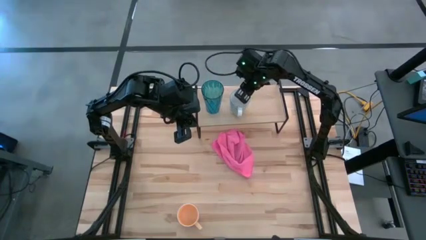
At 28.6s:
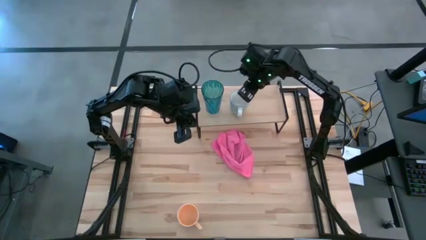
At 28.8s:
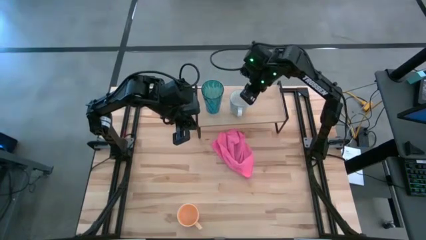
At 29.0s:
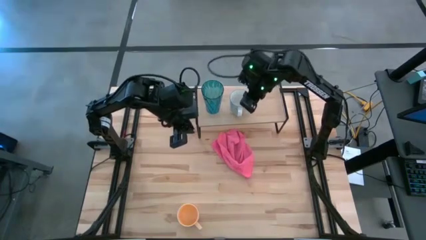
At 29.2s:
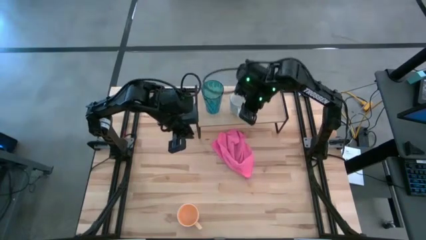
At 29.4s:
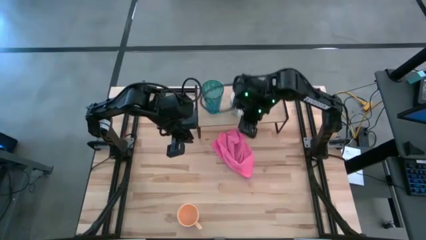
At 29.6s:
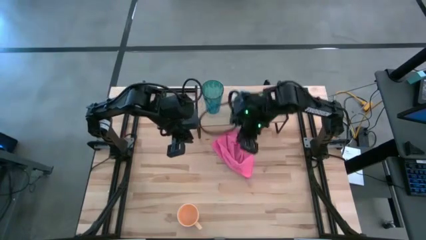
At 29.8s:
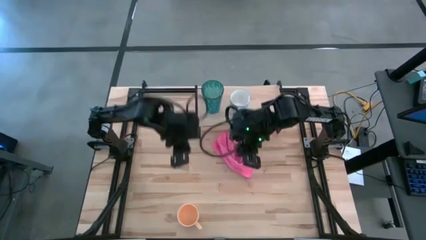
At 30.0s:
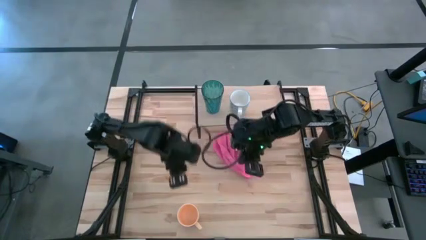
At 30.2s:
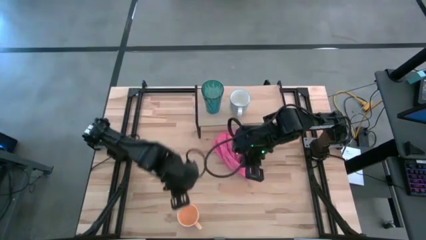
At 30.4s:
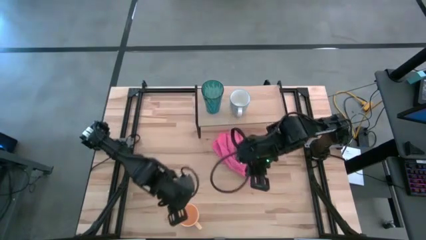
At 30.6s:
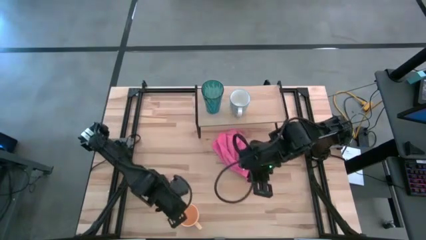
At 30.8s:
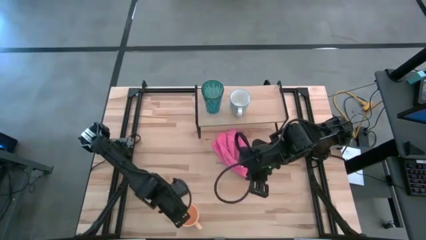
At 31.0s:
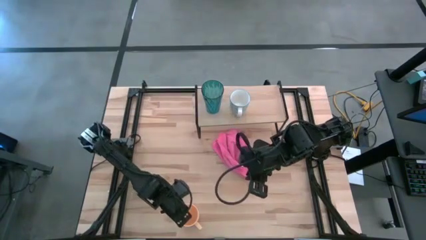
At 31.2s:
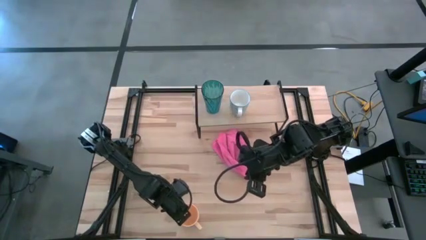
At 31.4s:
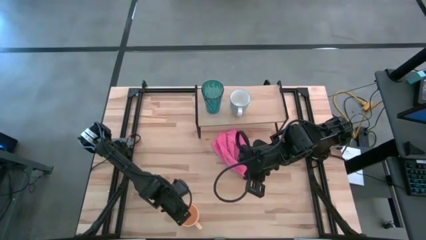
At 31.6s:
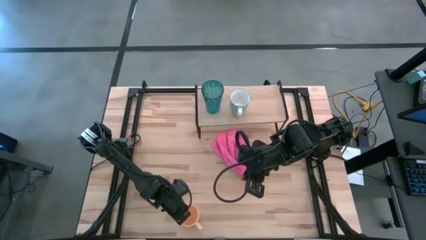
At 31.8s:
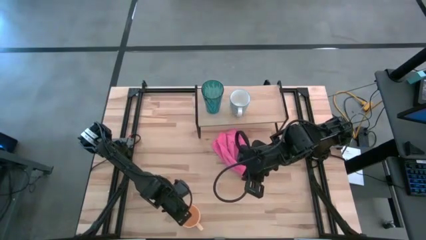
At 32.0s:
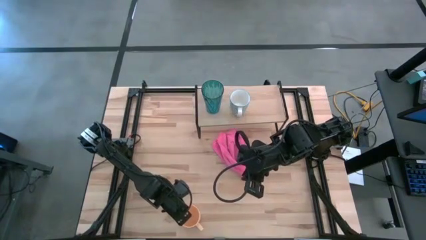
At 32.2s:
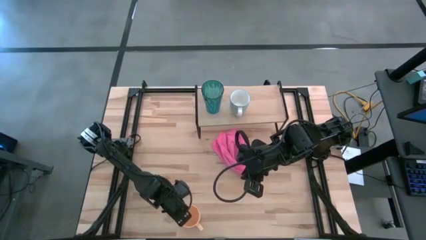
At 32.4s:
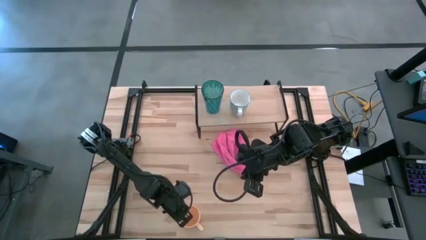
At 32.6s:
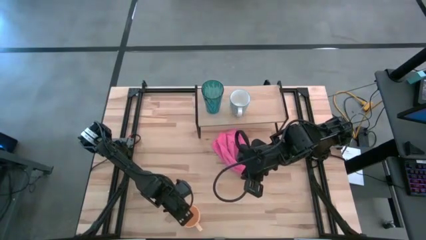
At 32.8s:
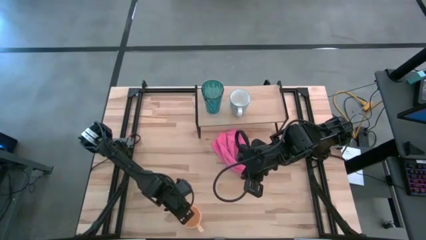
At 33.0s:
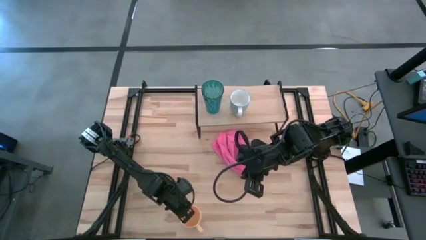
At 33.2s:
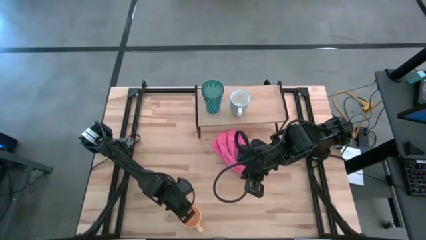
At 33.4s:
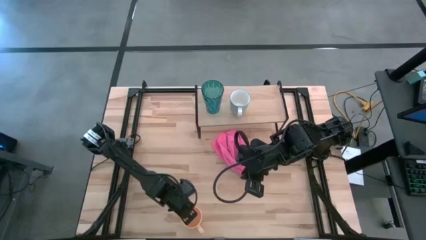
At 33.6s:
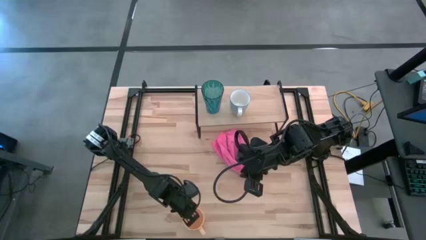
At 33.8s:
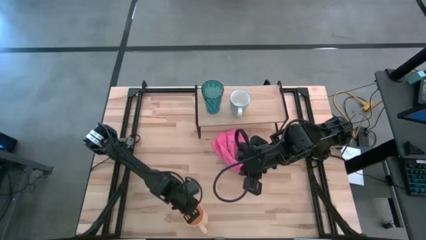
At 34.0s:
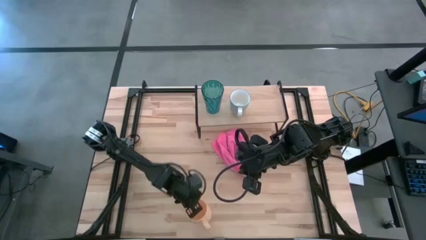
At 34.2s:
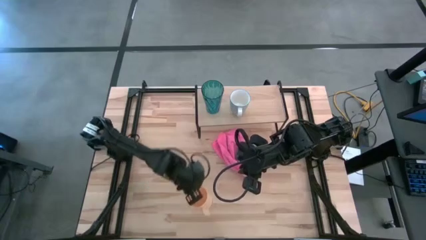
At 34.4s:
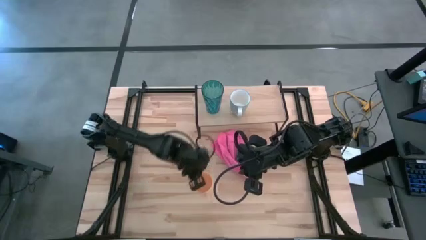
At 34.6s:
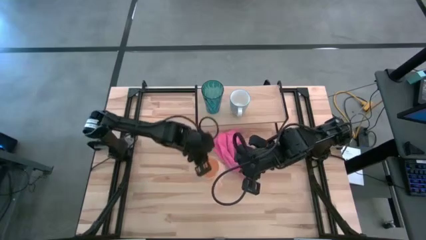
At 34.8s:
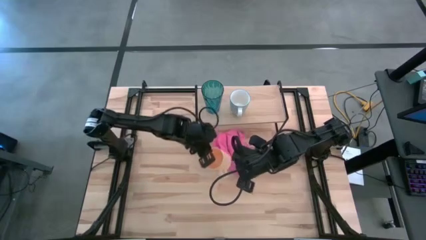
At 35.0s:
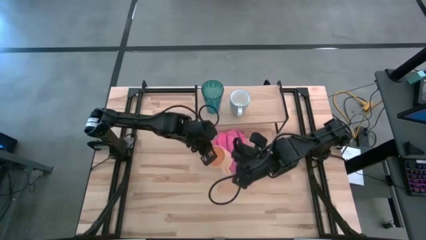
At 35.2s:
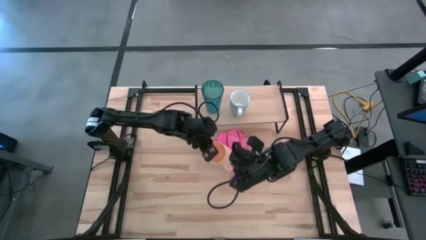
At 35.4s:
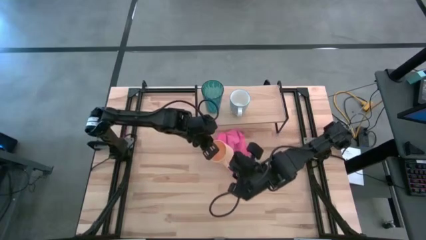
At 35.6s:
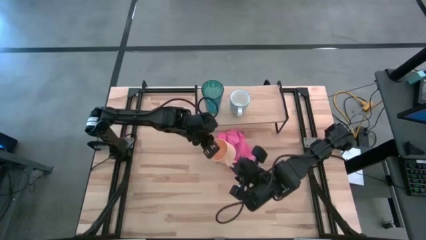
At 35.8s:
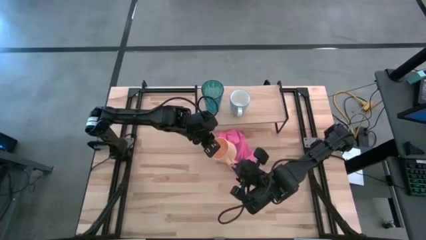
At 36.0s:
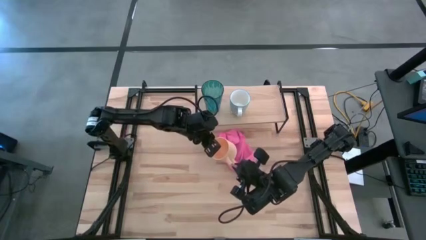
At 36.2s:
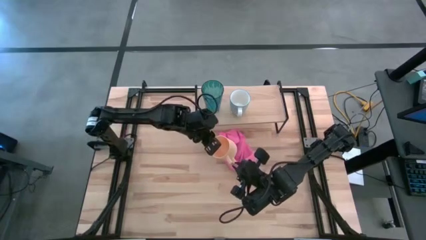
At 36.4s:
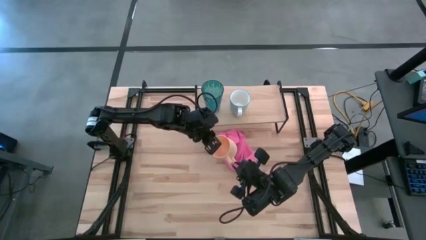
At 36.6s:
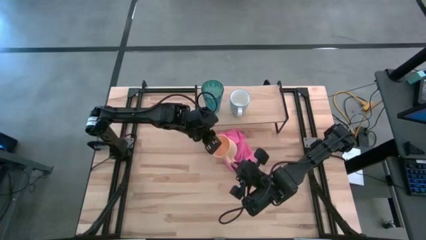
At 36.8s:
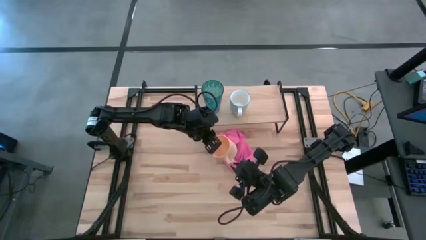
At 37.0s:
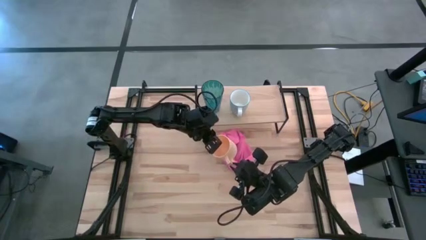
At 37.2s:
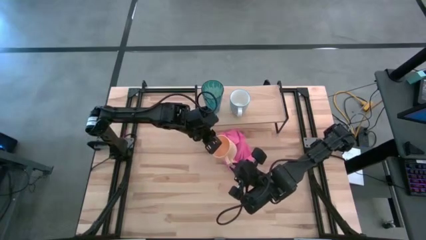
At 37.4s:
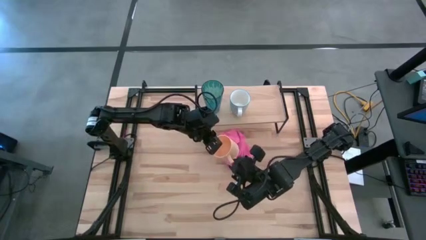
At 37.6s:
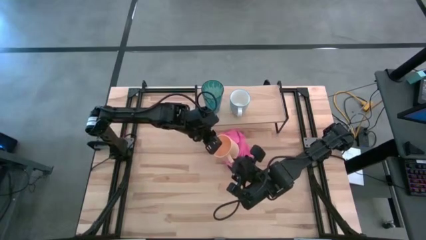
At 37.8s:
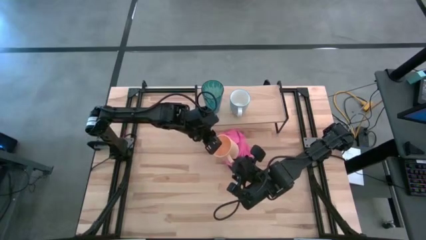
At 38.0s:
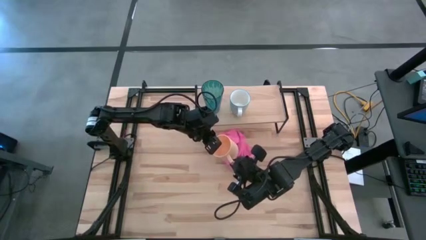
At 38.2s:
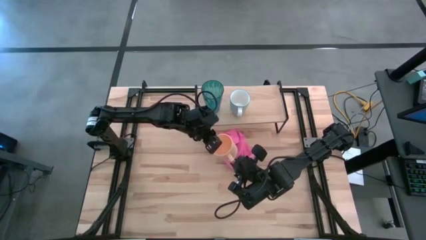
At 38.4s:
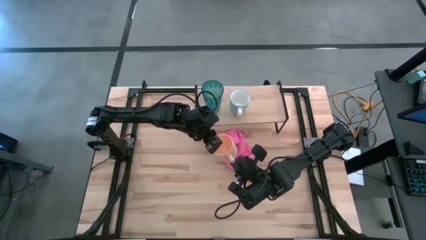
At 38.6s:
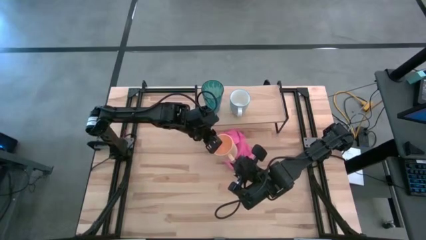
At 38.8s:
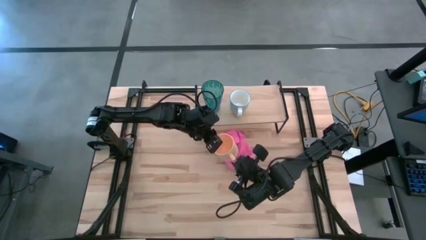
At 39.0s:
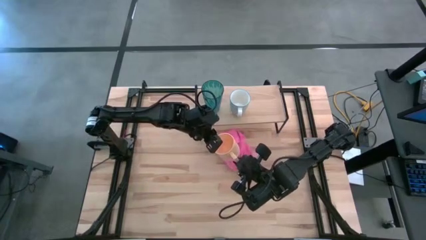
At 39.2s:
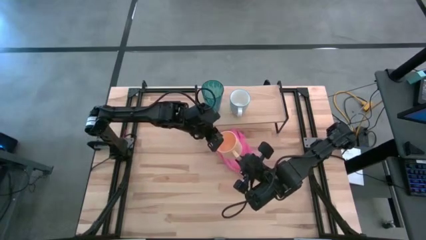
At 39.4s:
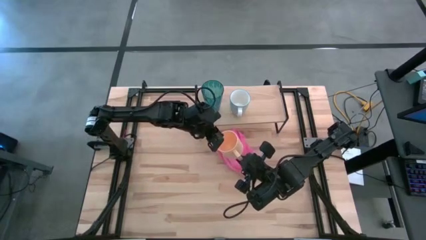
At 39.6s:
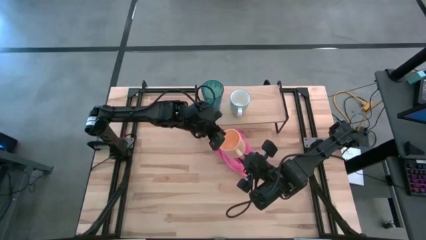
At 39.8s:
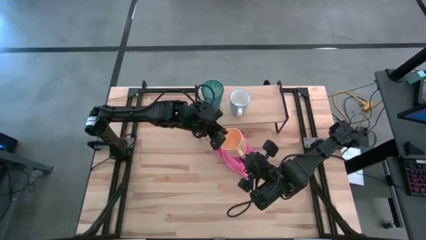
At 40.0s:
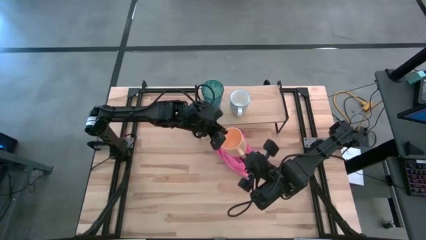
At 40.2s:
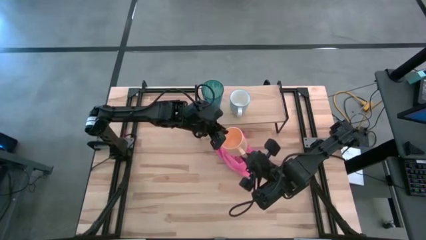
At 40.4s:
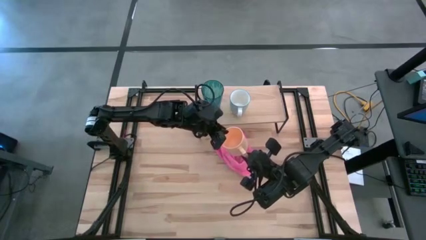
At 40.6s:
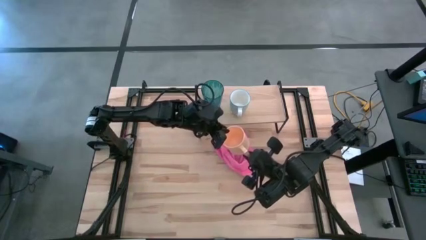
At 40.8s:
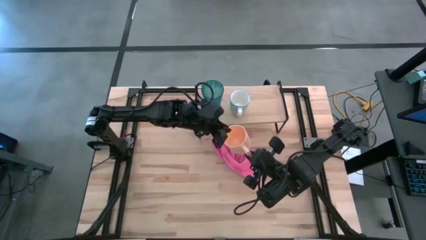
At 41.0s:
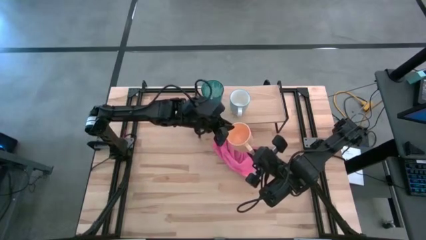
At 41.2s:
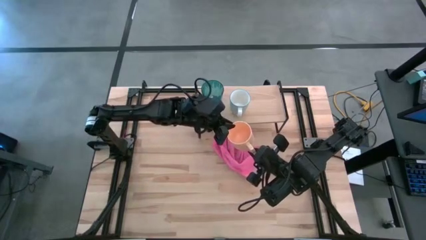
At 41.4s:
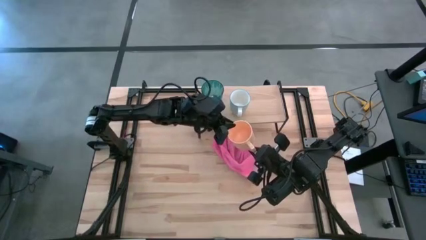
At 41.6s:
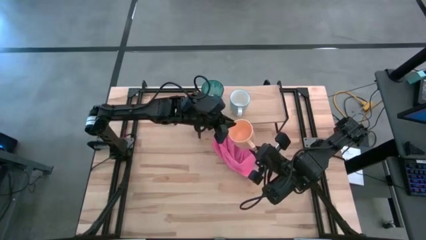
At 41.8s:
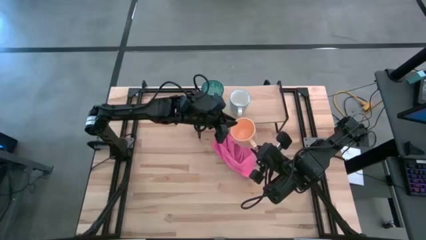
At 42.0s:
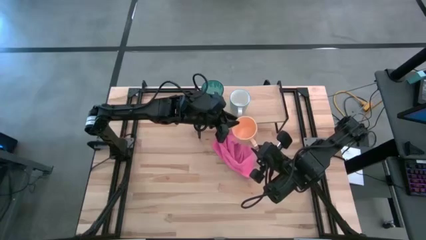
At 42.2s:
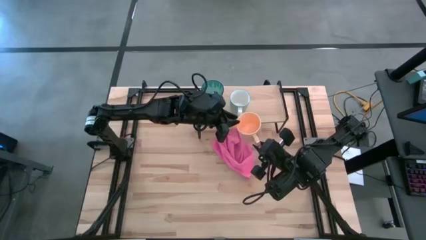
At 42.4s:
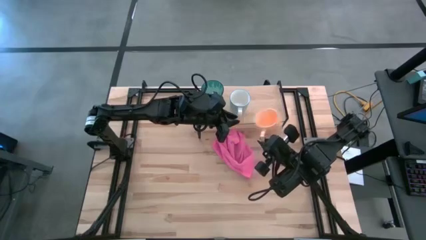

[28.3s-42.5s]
Task: Stack small to large cups/mugs on shelf
Put the yellow cup on the shelf
